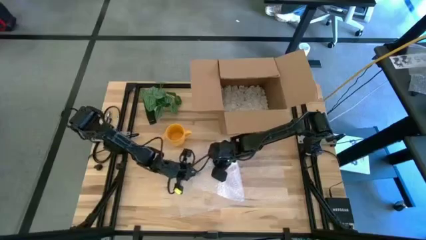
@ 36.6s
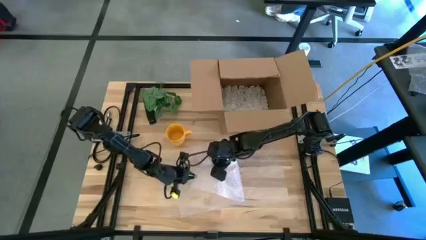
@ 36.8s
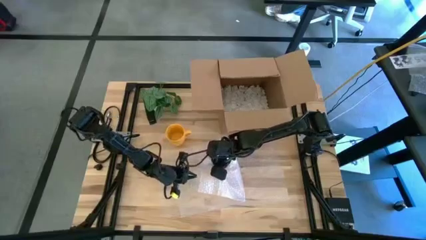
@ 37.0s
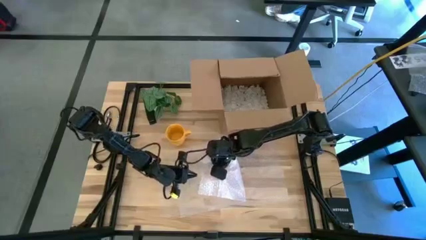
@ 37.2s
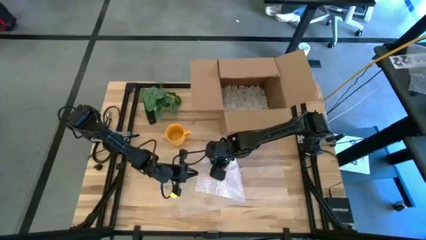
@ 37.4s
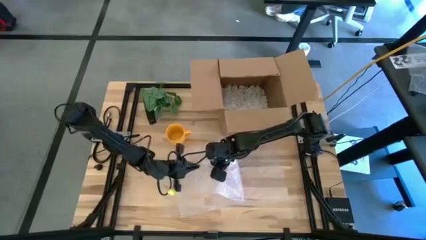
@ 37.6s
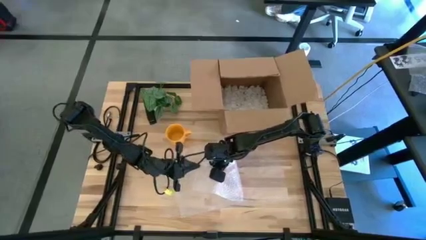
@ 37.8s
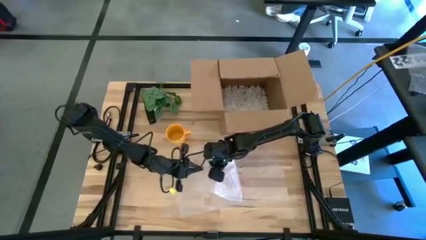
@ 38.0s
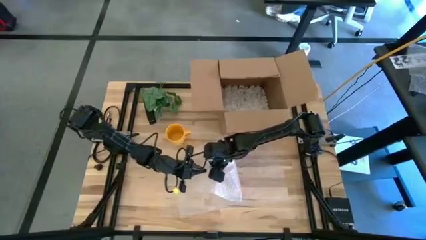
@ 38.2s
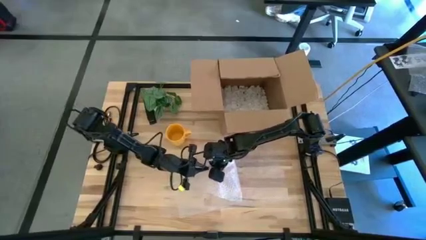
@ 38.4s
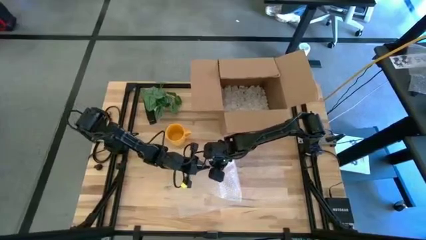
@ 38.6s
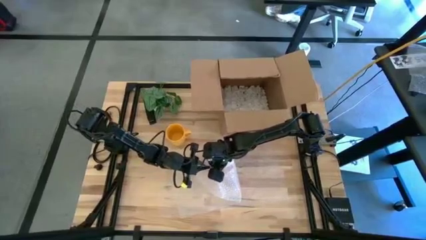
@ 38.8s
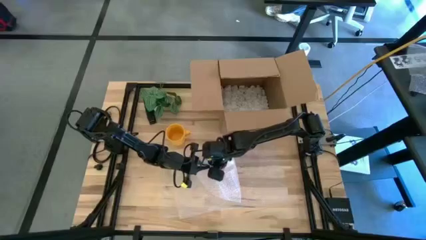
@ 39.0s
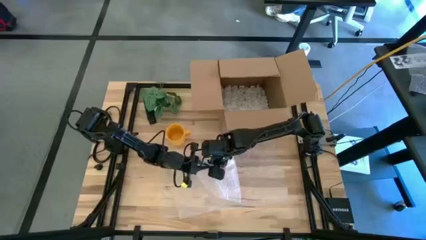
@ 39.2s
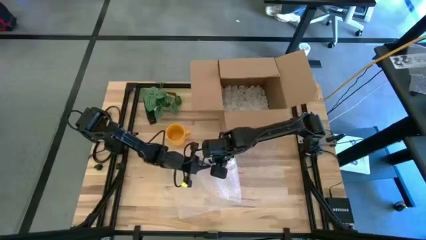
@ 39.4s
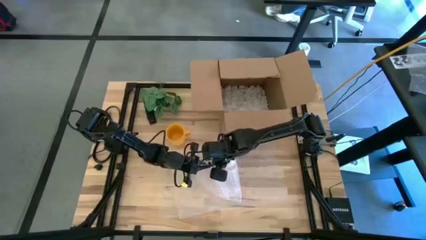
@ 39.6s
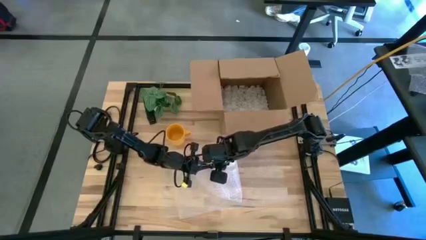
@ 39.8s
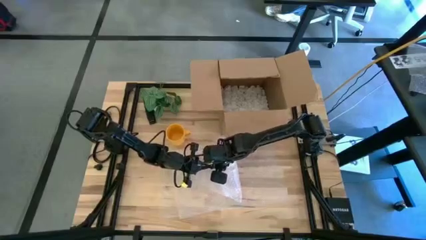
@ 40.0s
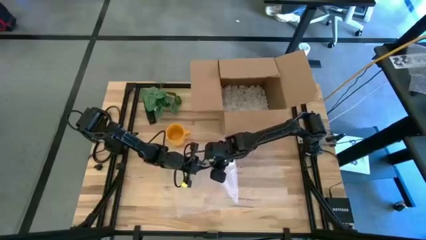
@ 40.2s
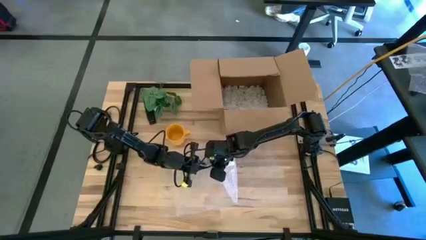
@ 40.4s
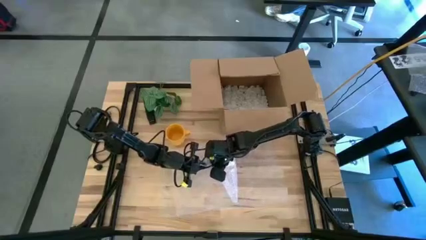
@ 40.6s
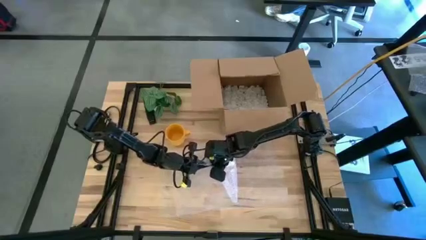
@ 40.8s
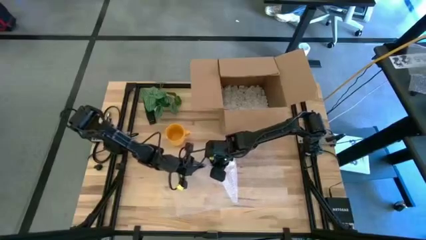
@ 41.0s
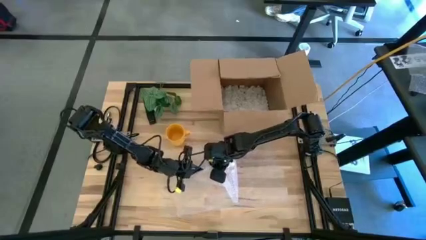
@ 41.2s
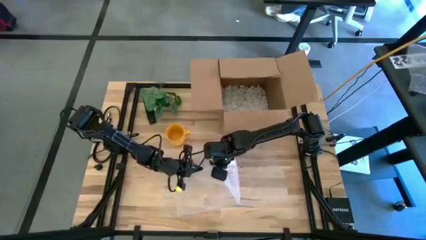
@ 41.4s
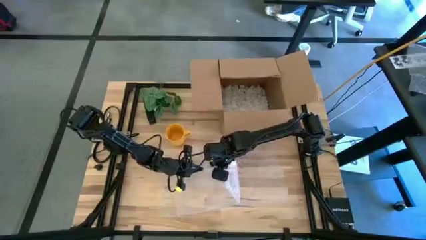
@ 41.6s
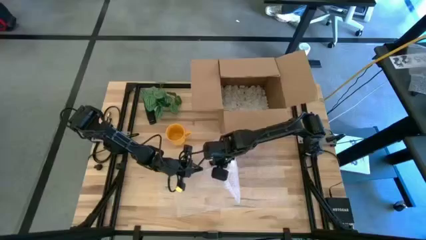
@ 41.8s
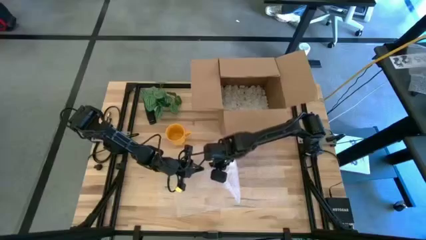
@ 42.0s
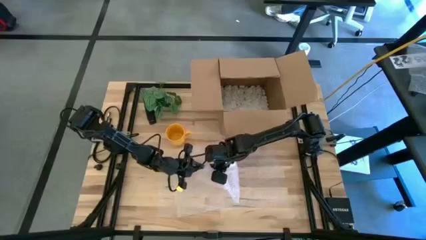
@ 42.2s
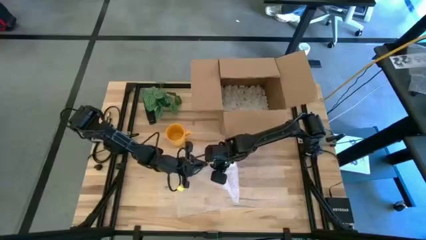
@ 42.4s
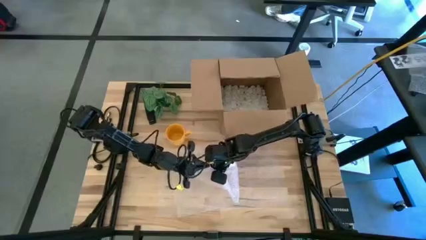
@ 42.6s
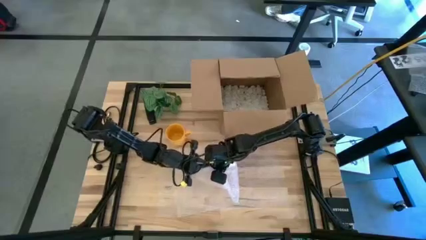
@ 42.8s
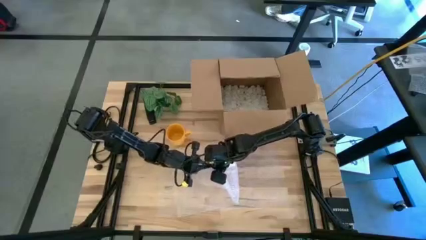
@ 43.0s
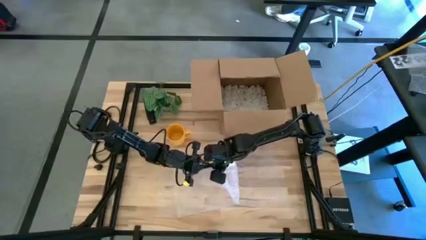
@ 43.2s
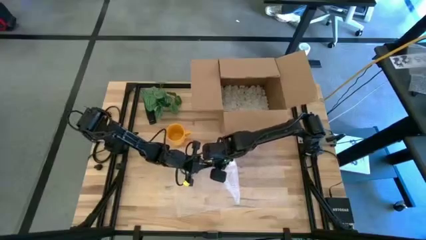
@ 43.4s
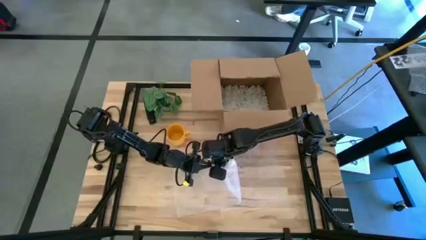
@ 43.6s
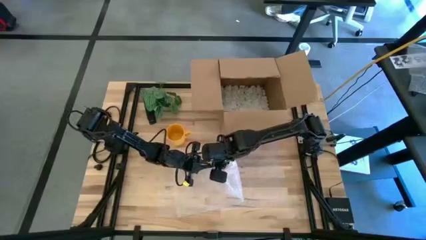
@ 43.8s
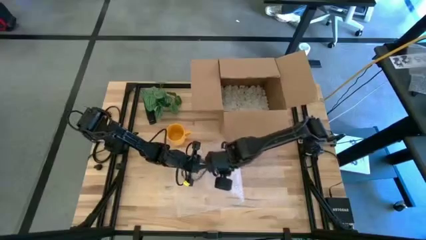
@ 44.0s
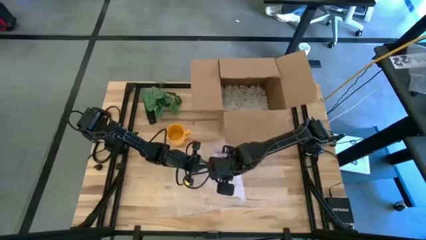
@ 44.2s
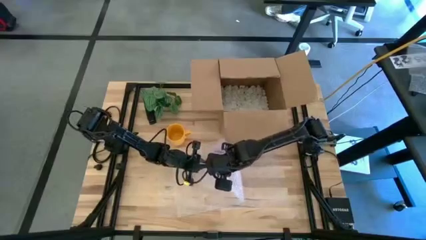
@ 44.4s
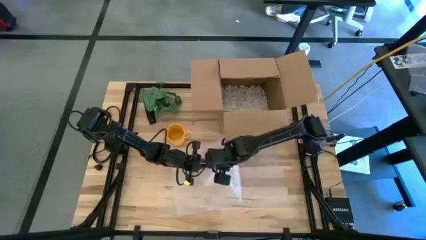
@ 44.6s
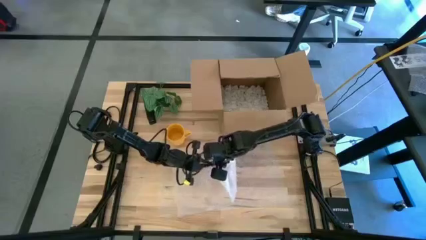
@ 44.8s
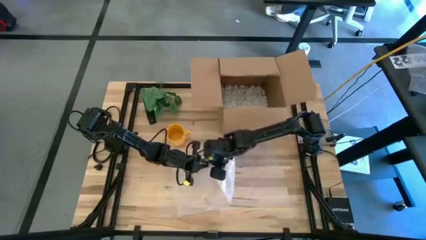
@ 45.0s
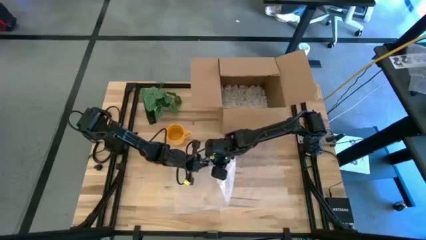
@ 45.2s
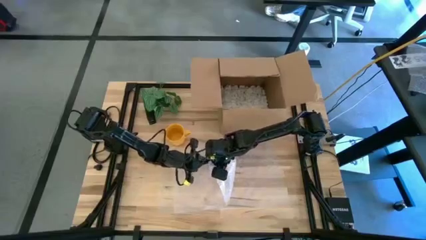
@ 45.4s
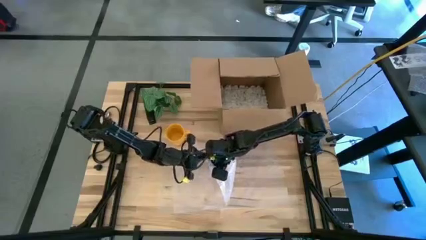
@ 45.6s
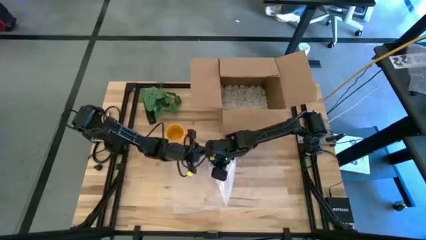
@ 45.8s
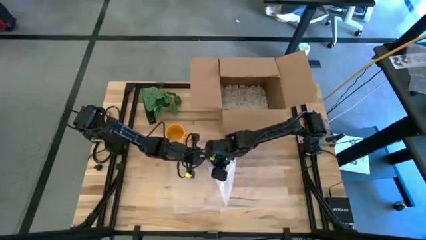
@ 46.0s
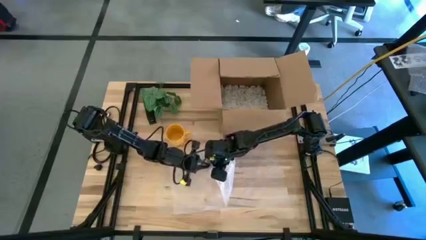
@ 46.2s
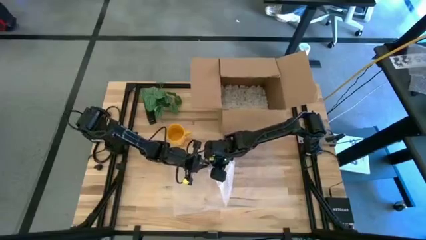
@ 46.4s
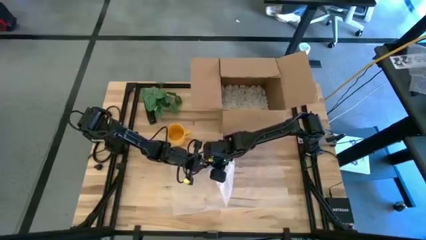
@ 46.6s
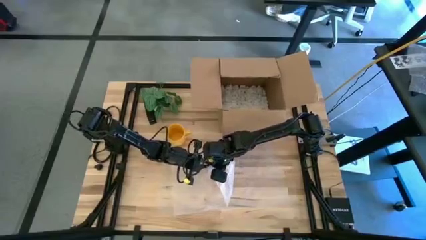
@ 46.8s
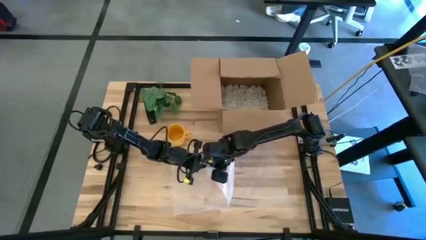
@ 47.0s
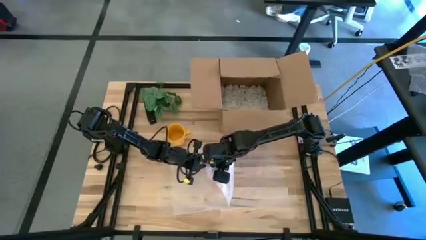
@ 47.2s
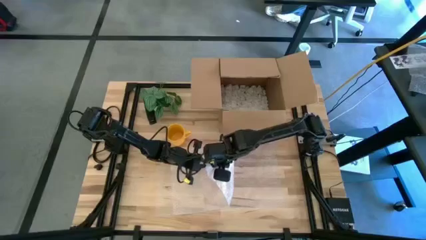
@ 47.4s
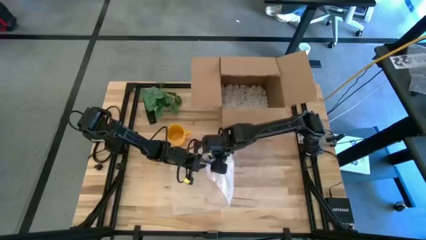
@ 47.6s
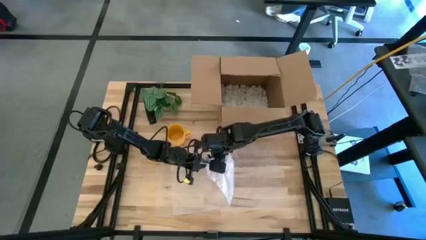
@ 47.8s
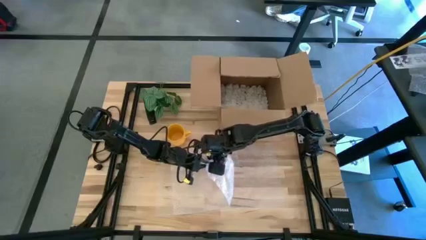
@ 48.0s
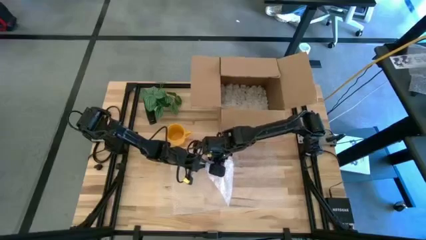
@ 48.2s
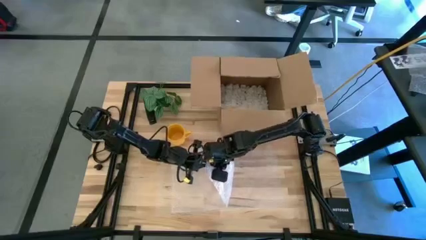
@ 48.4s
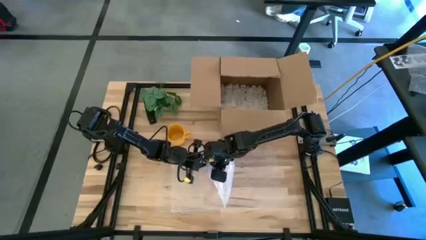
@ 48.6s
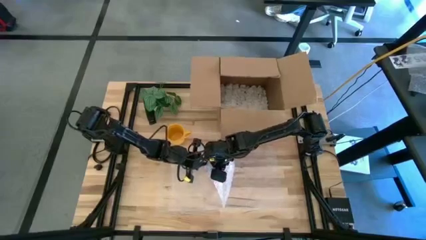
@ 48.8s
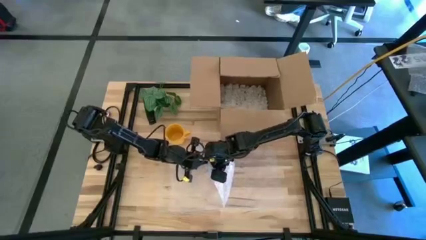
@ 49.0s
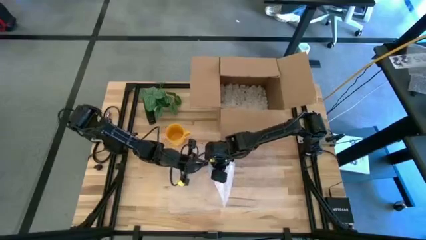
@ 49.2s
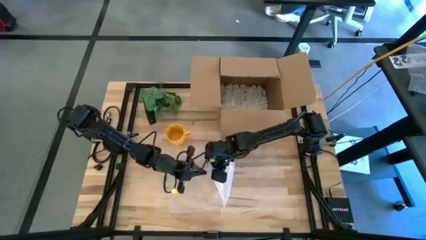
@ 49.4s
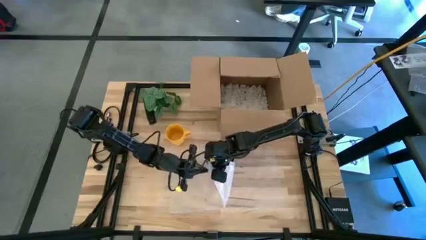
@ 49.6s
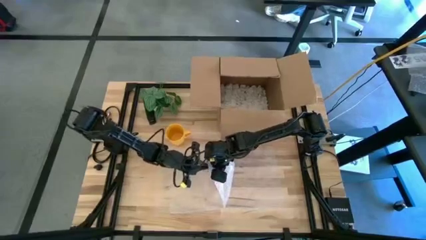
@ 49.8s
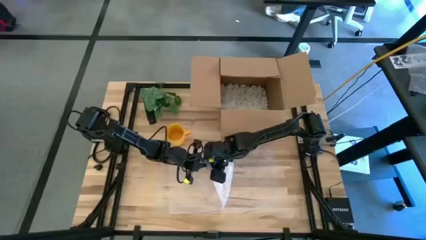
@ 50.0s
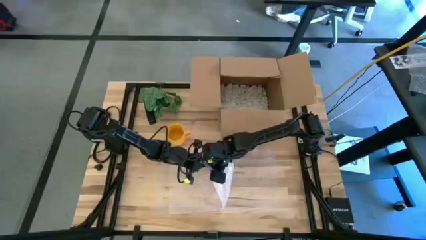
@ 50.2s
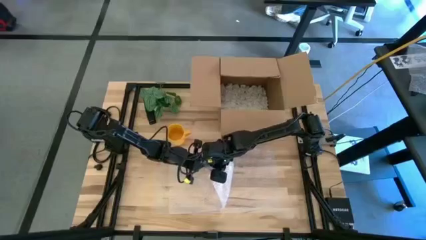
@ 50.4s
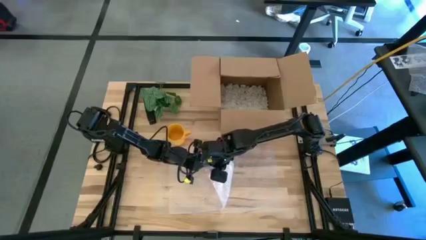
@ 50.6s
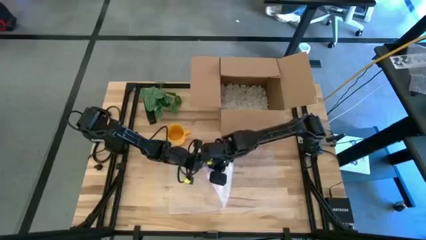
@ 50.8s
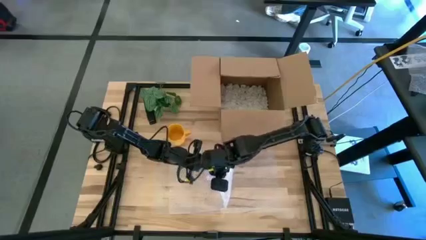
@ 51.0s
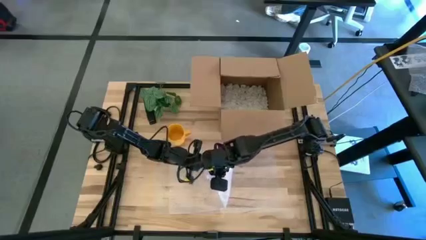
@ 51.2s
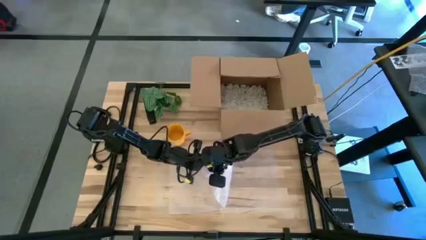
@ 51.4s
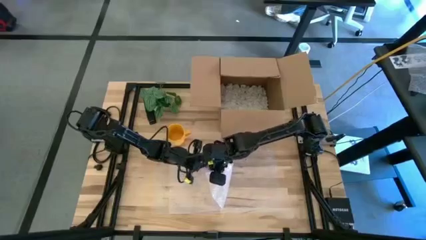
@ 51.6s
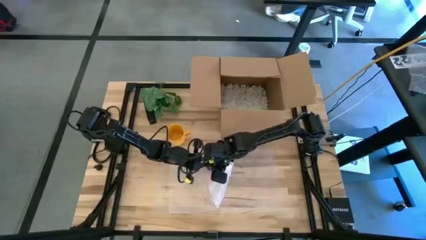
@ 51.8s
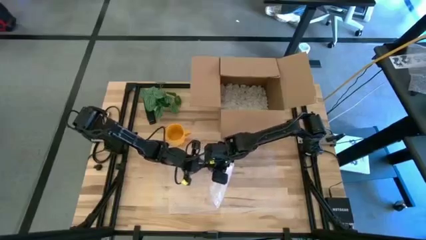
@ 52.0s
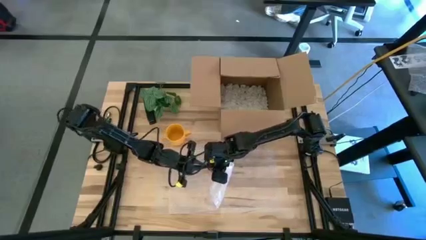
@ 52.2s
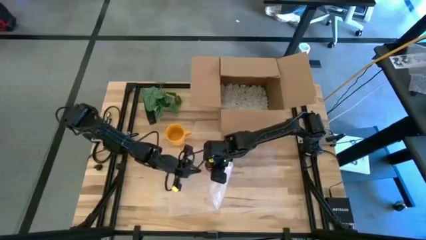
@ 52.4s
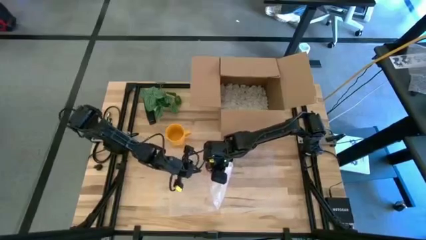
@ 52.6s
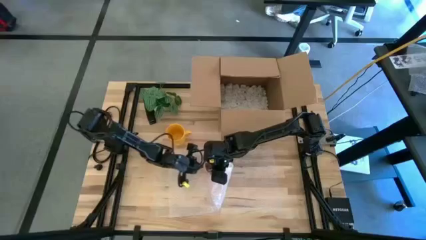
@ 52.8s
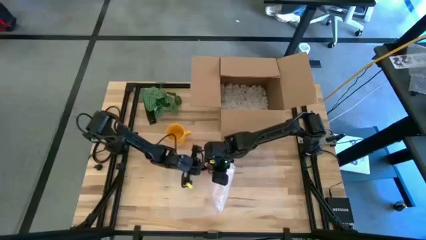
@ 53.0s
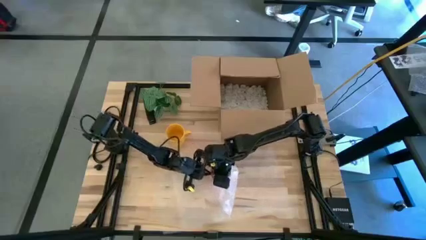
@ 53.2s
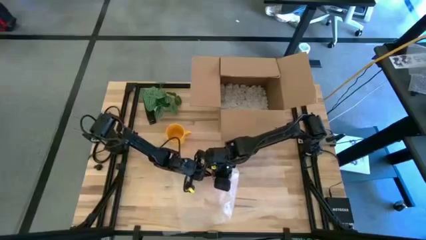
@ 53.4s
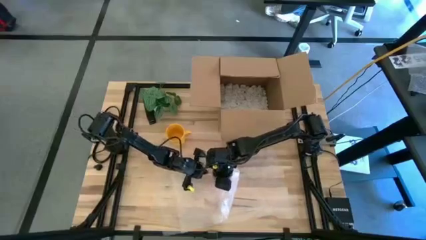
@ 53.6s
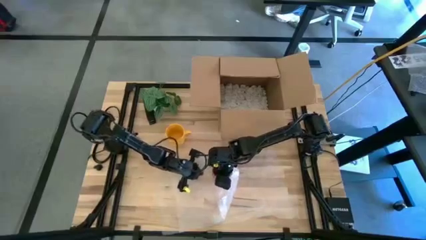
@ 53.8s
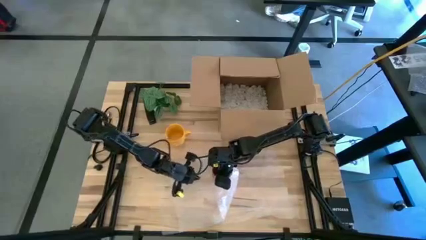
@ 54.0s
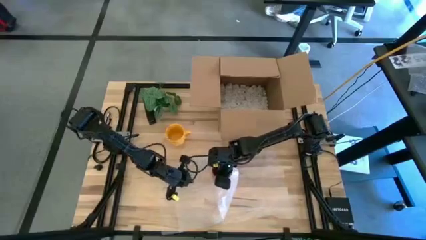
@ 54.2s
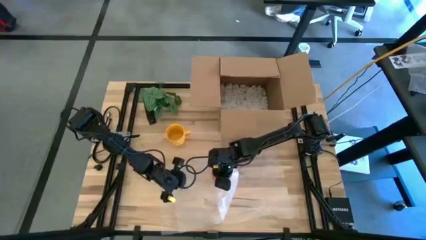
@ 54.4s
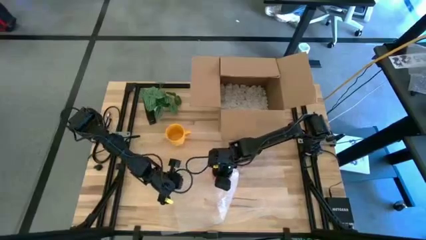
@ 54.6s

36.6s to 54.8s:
Task: wrap mug
Wrap the orange mug with the bubble wrap
